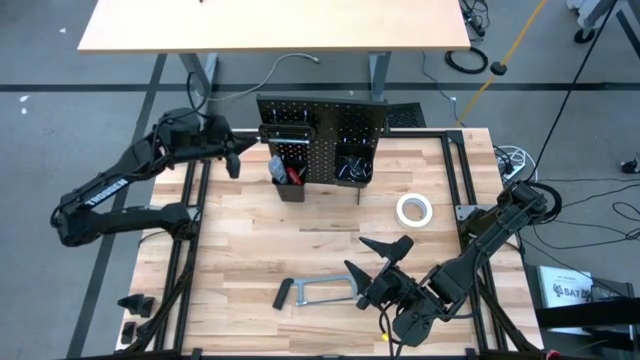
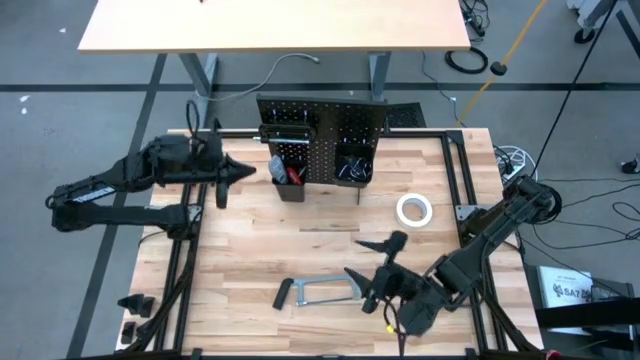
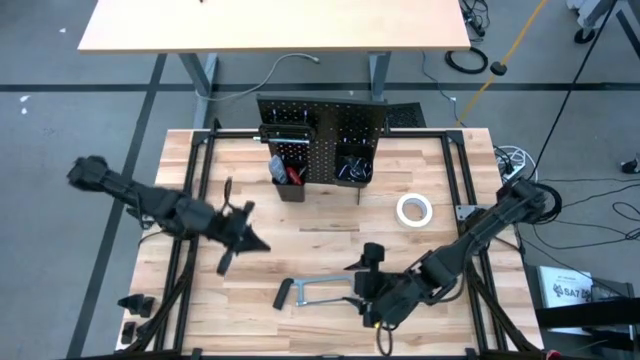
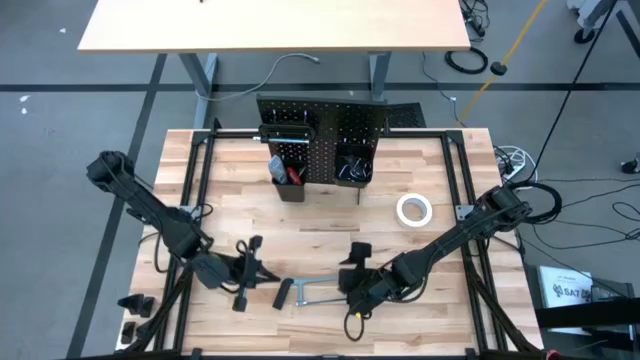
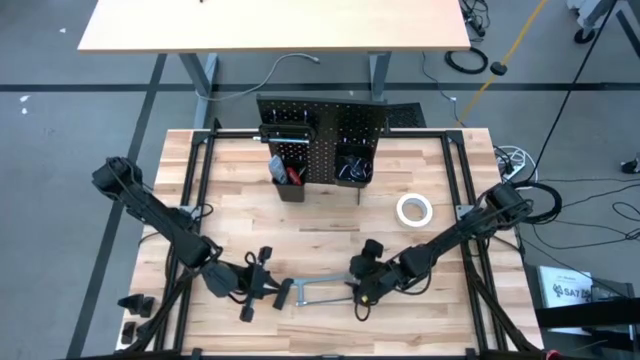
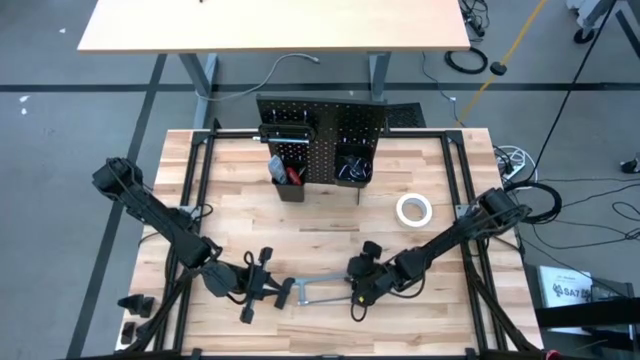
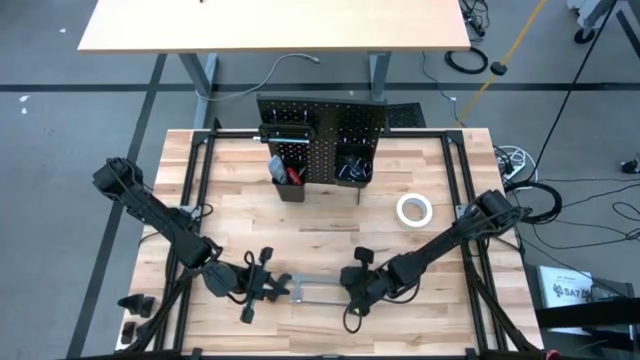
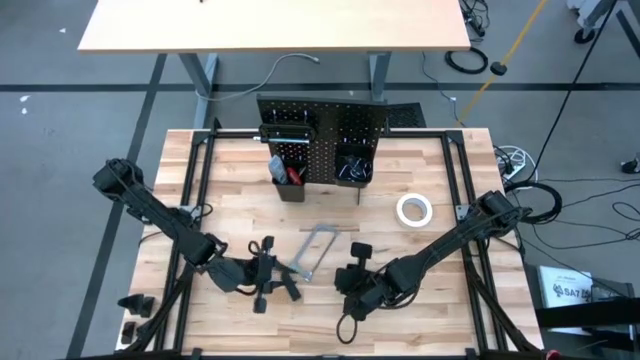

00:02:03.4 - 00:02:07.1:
Task: Hang tools onto peg board
Hang the gray hacksaw on the peg board

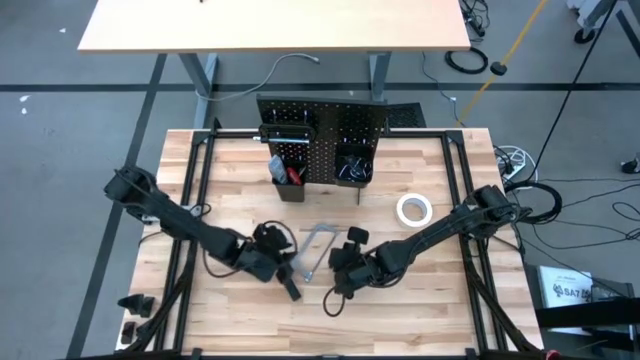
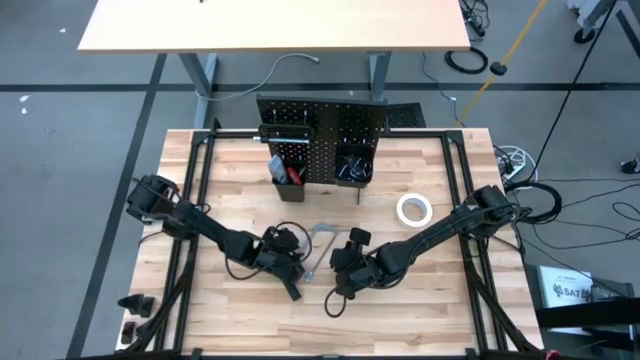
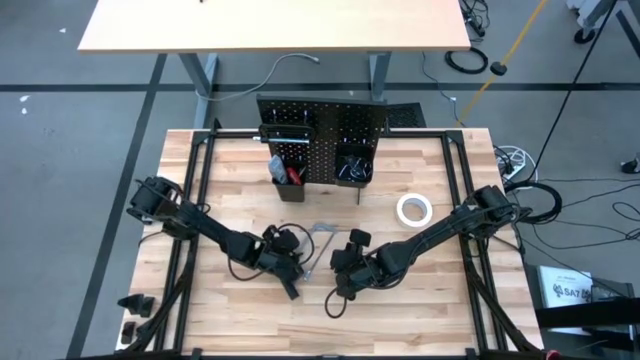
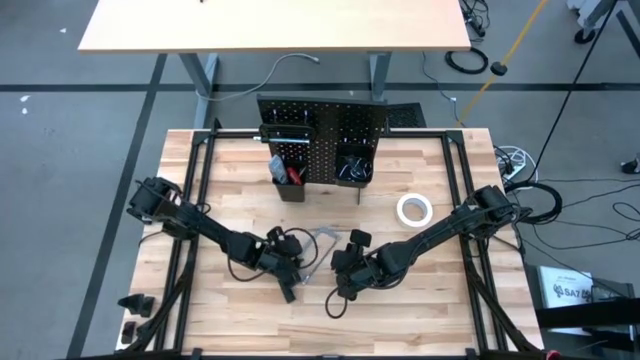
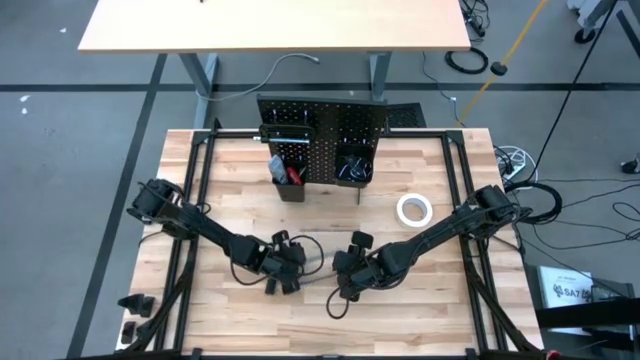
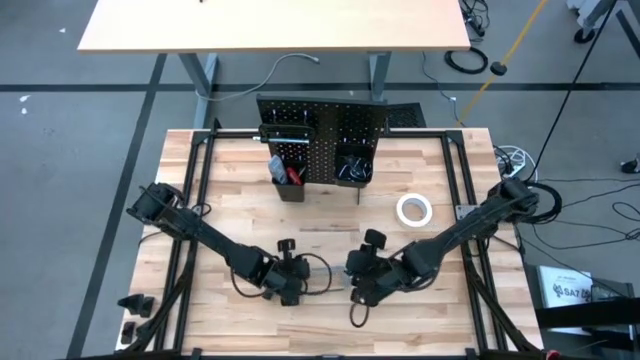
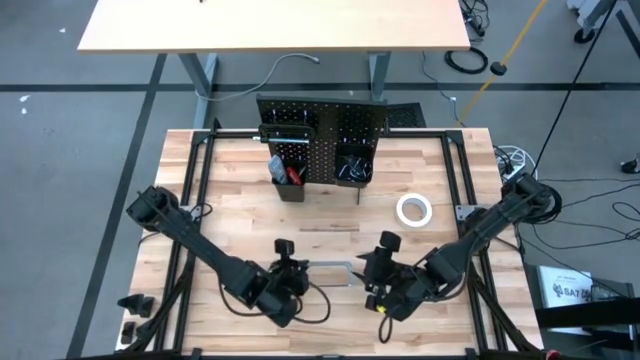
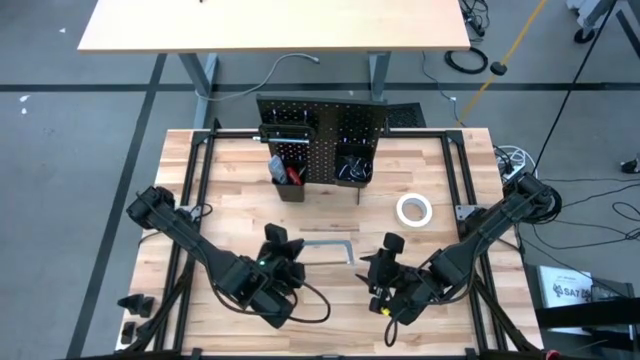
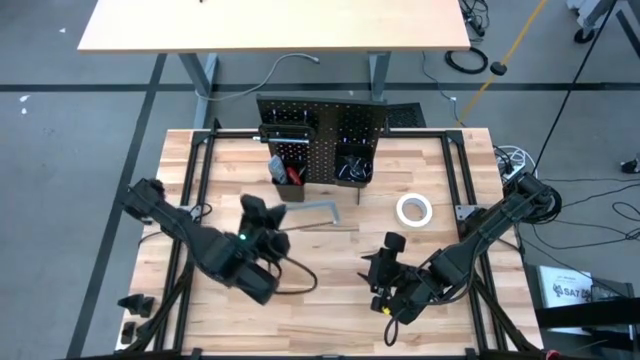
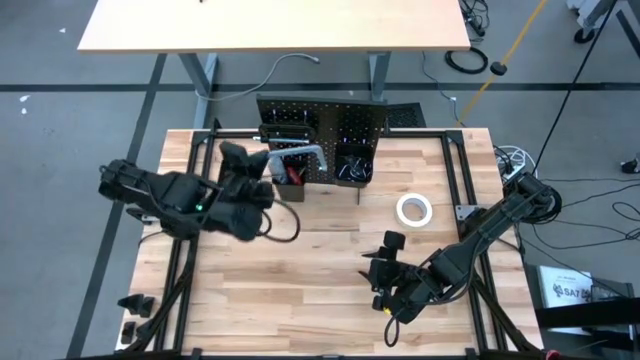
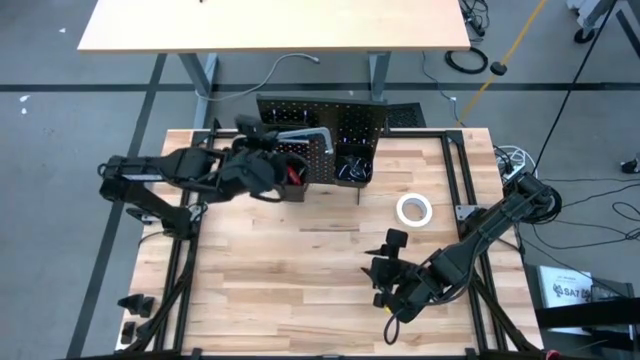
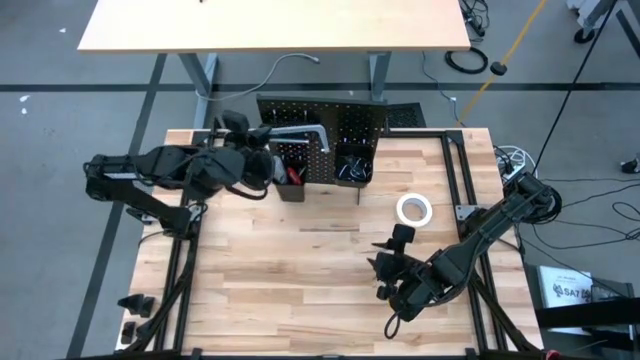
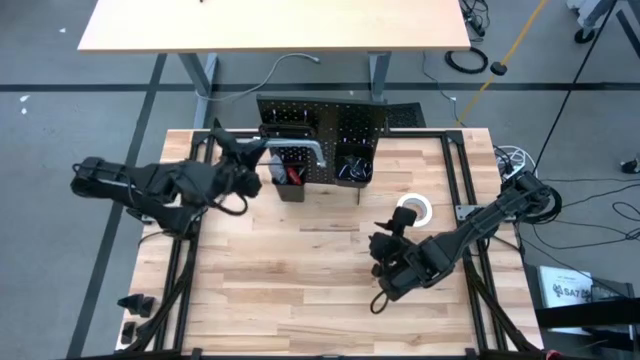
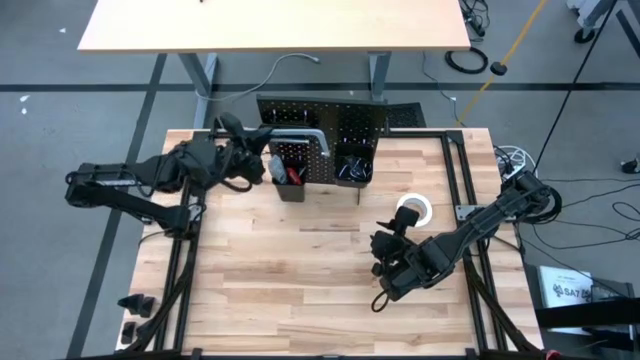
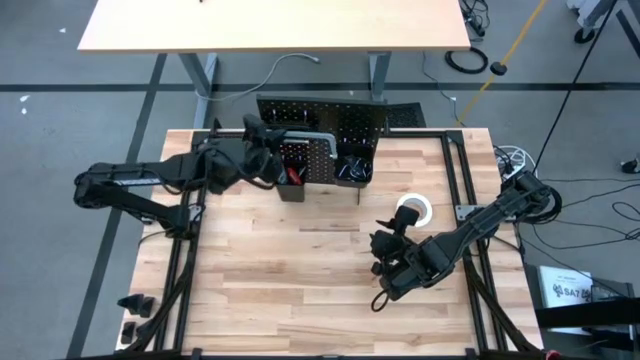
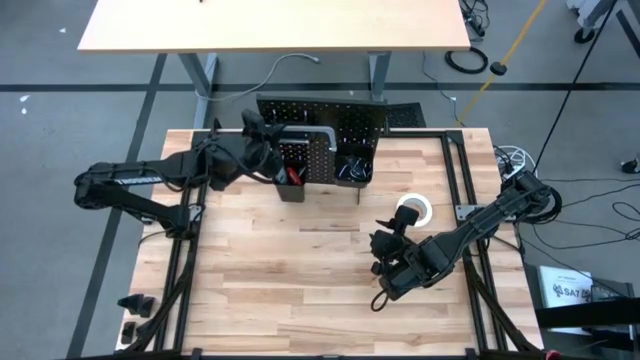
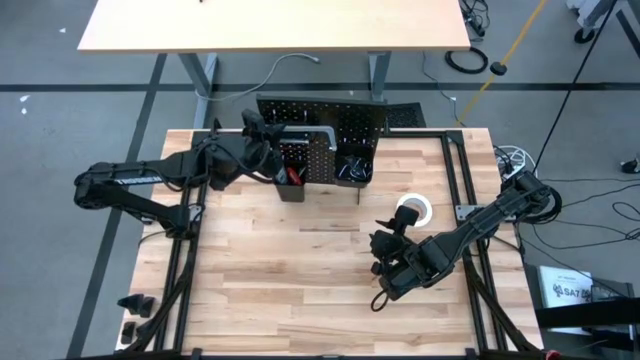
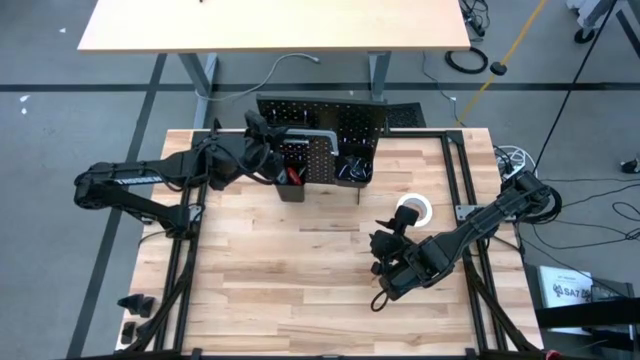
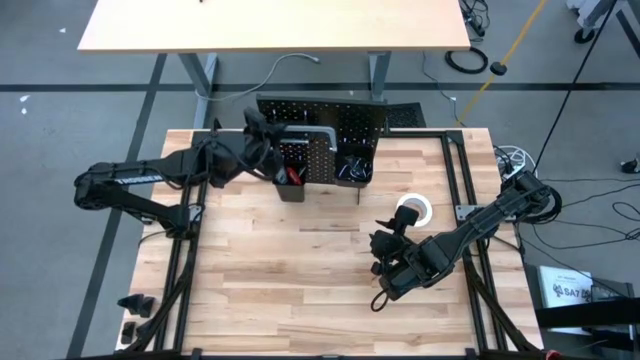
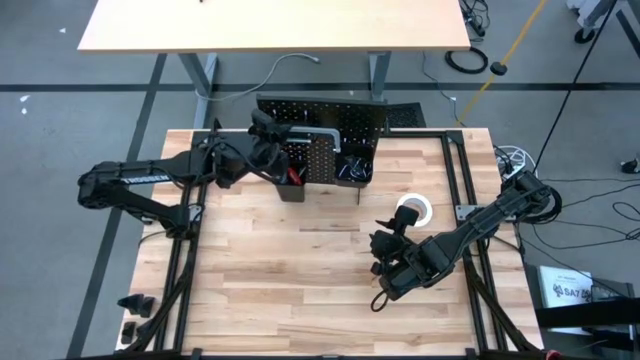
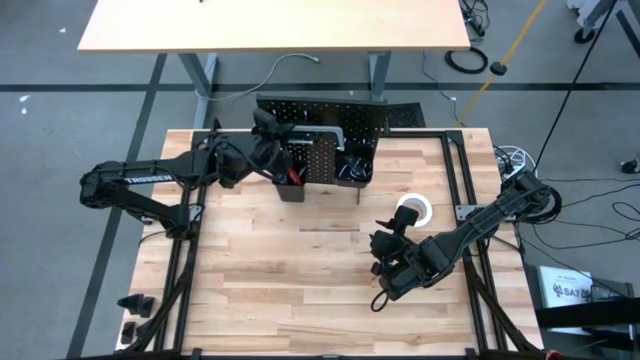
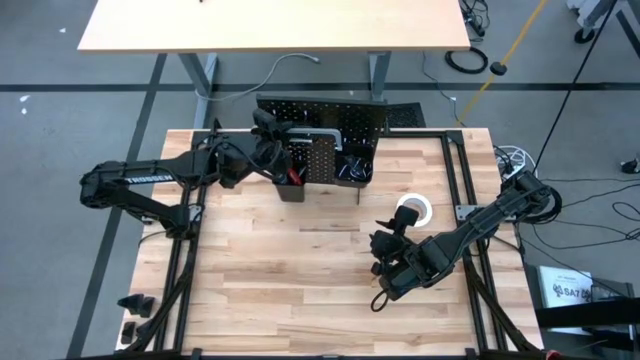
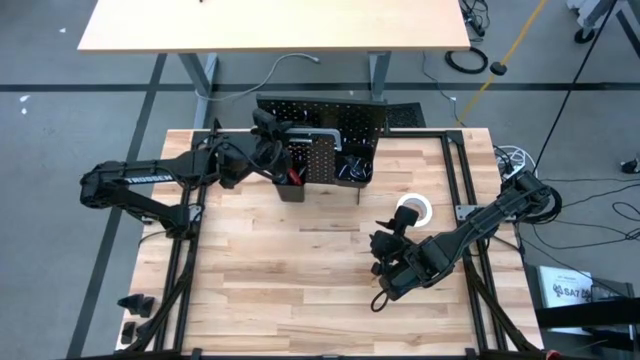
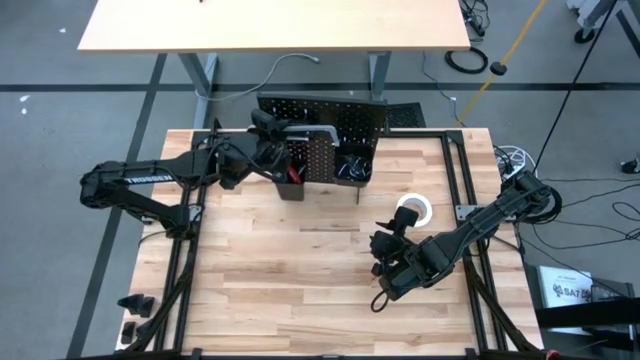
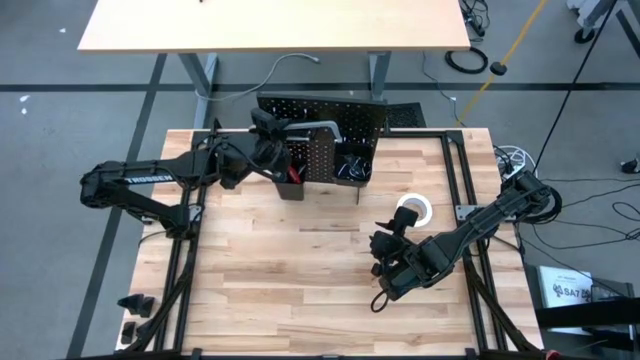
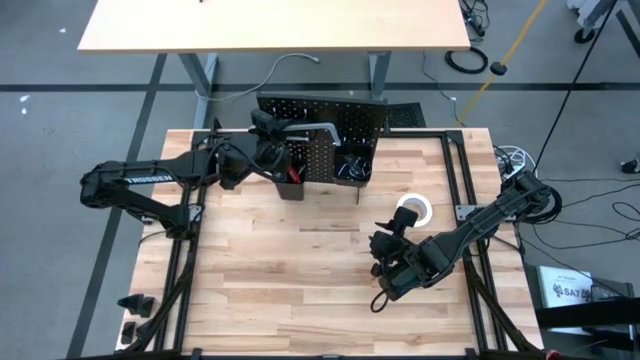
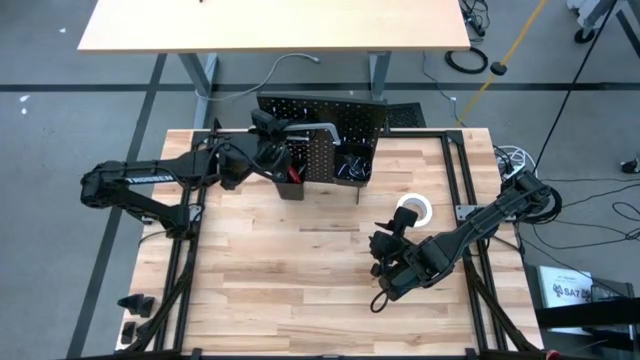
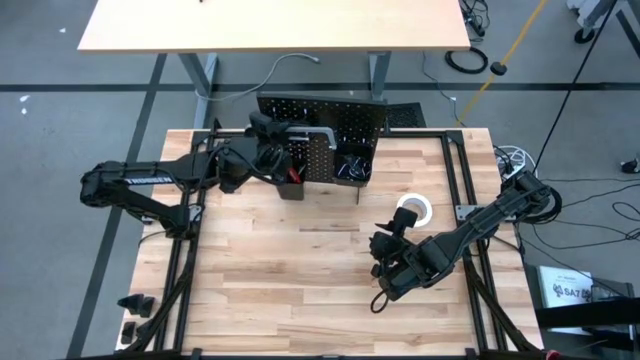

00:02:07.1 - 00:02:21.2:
Hang the gray hacksaw on the peg board

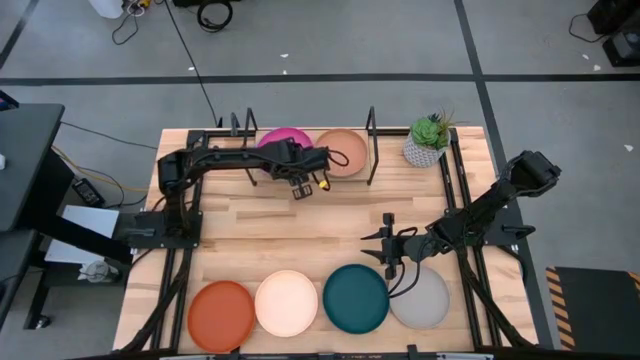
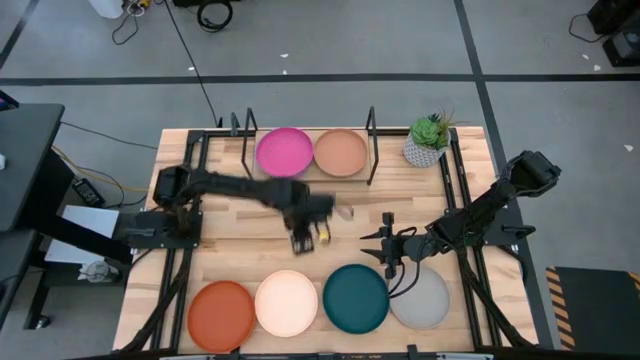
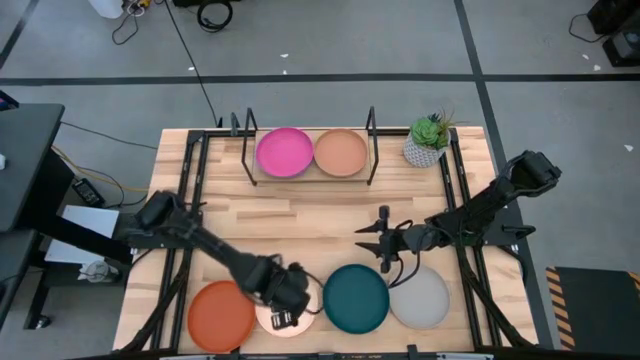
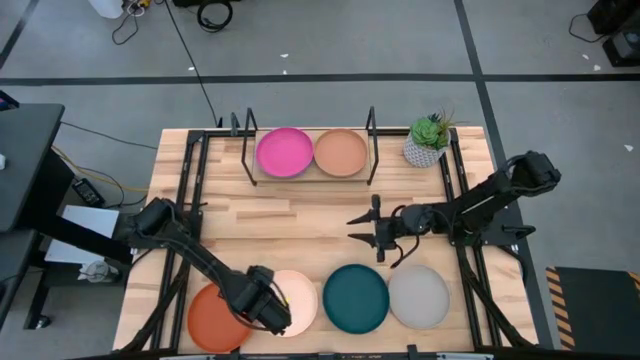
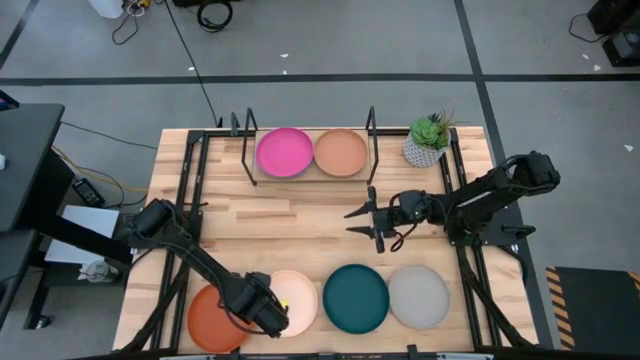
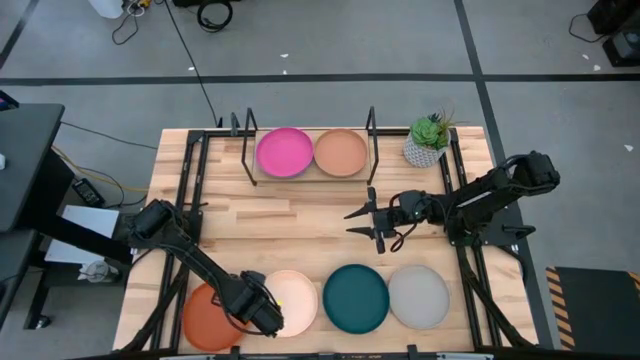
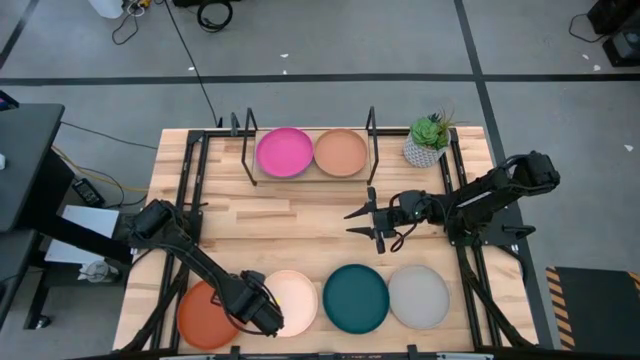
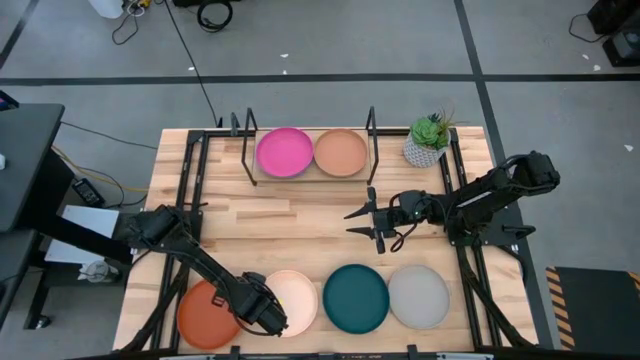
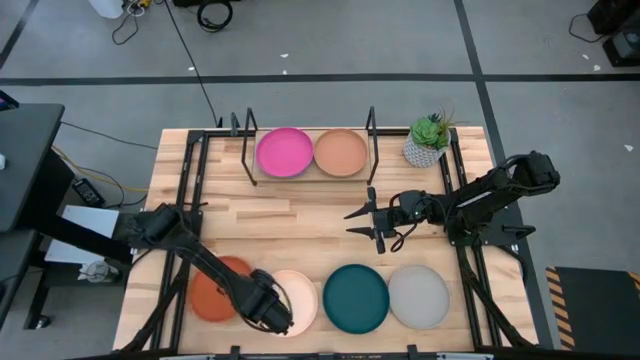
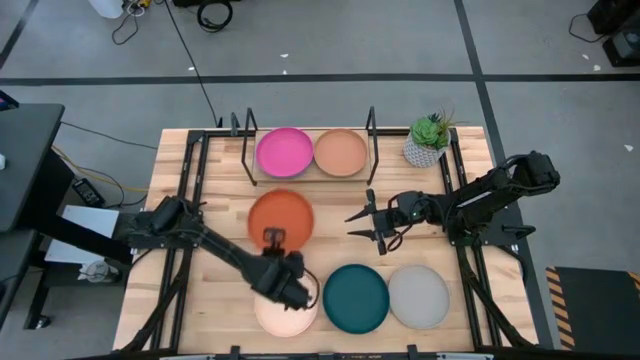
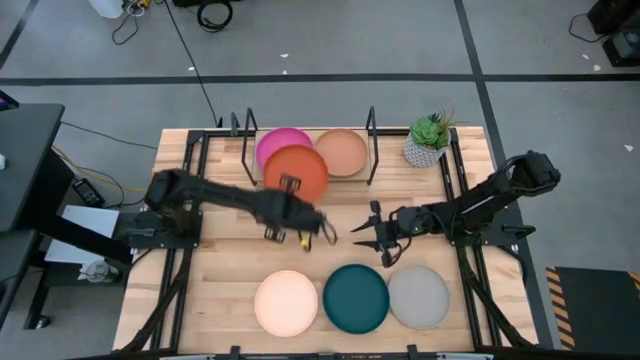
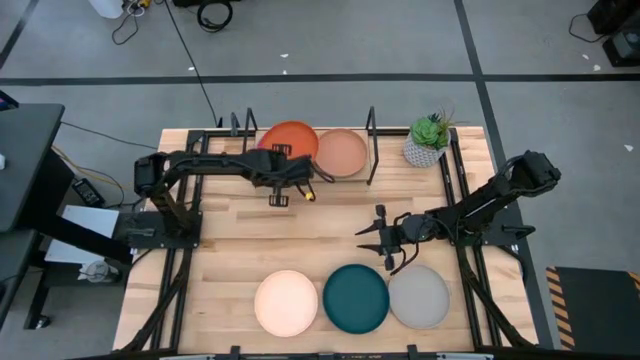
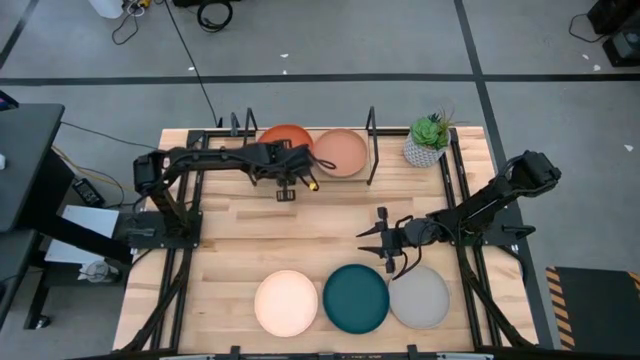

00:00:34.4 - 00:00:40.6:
Task: Place and stack plates onto a shelf
Stack the orange plate on top of the pink plate on the shelf
